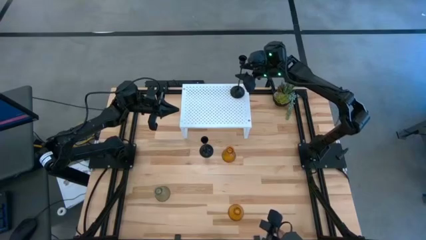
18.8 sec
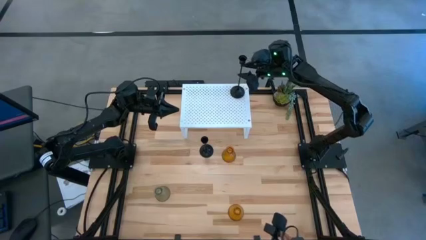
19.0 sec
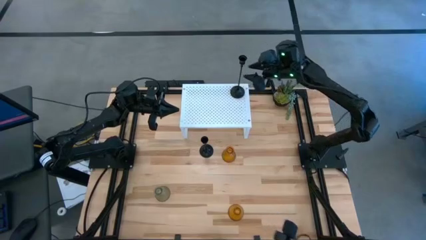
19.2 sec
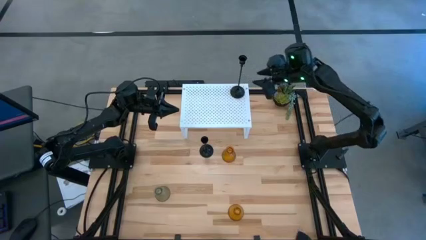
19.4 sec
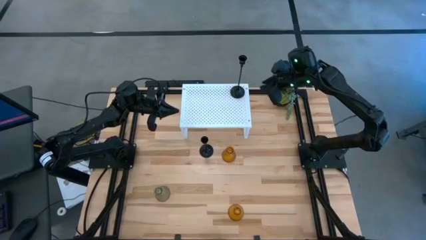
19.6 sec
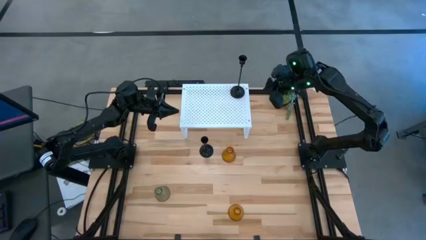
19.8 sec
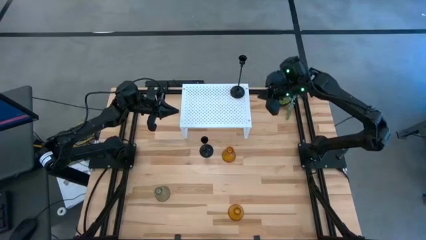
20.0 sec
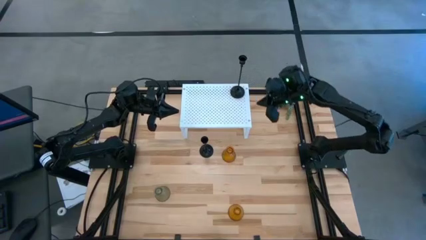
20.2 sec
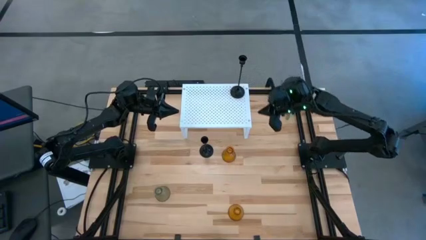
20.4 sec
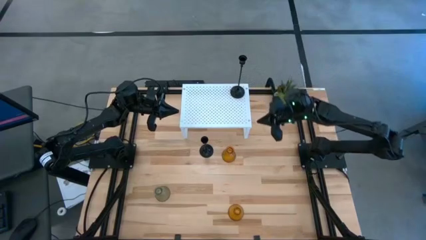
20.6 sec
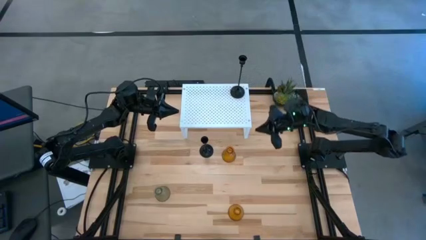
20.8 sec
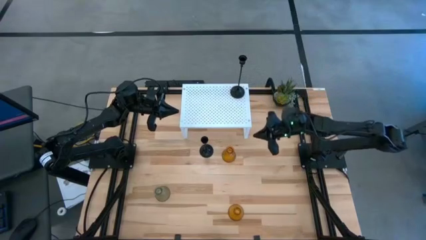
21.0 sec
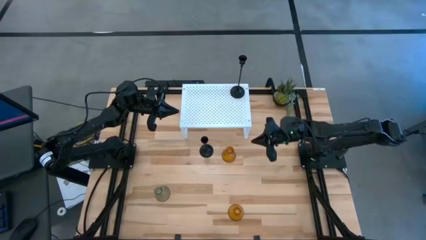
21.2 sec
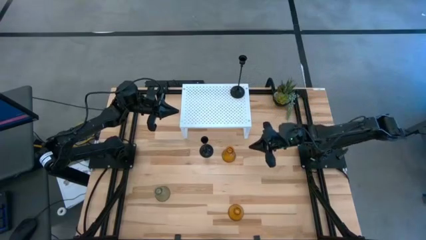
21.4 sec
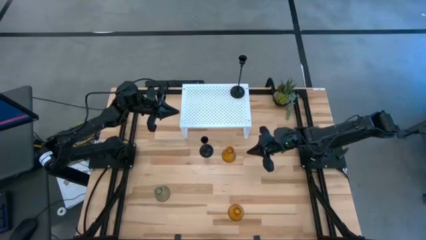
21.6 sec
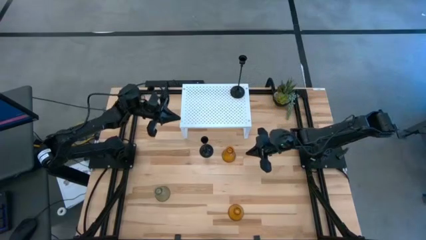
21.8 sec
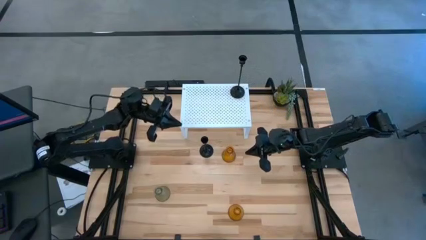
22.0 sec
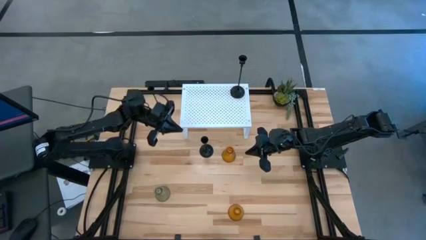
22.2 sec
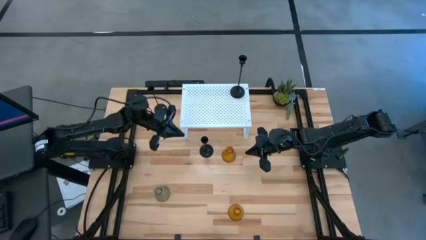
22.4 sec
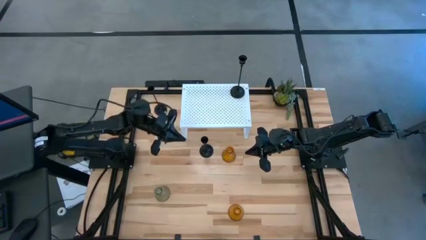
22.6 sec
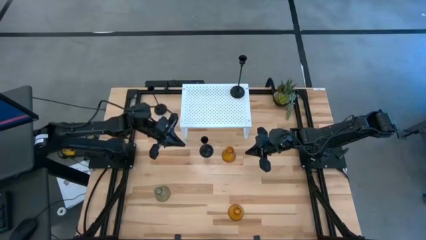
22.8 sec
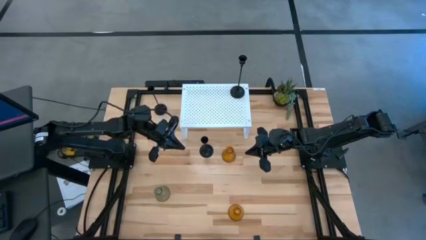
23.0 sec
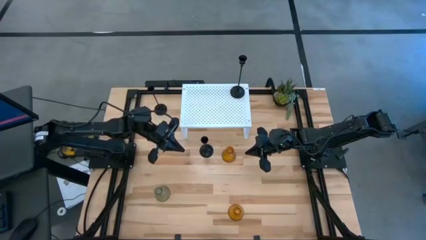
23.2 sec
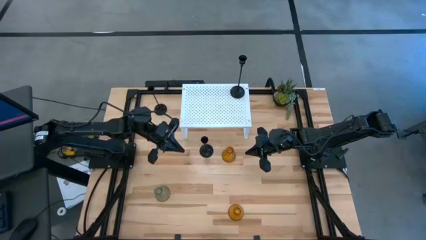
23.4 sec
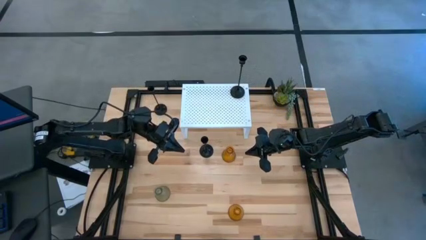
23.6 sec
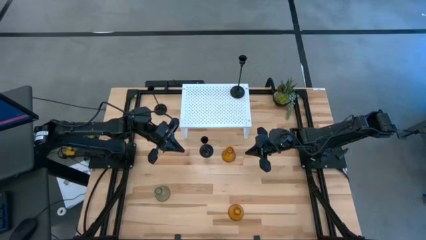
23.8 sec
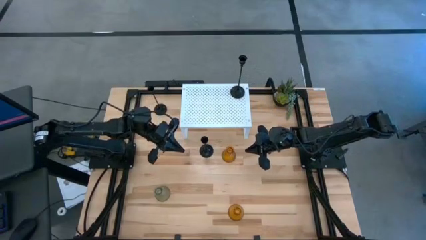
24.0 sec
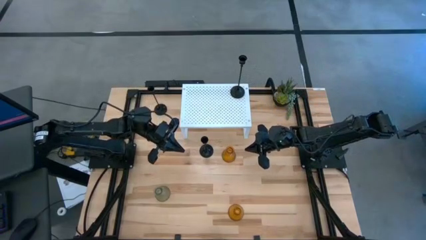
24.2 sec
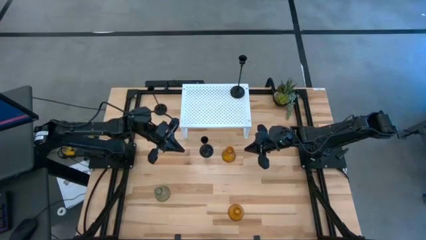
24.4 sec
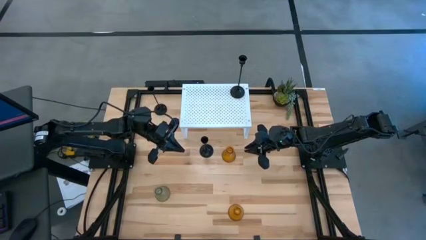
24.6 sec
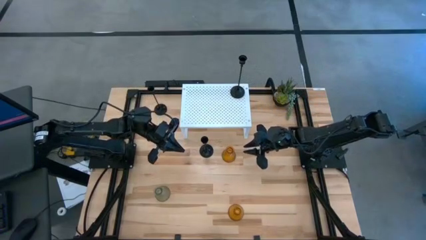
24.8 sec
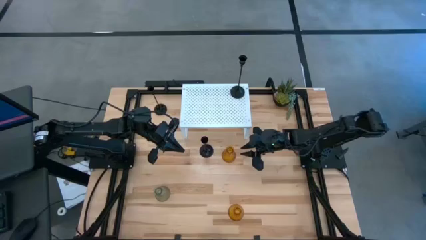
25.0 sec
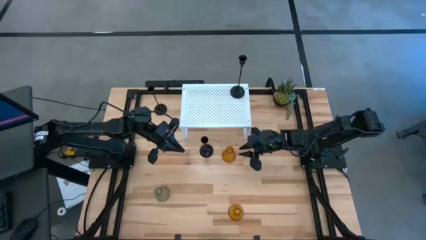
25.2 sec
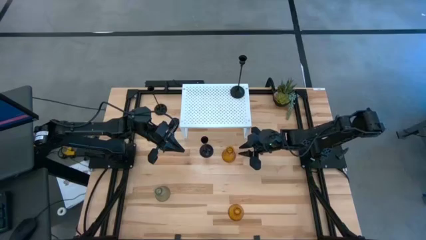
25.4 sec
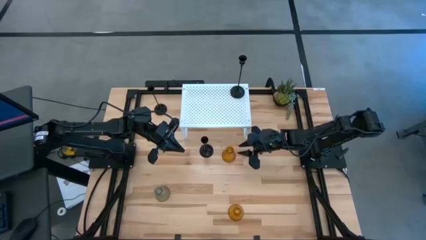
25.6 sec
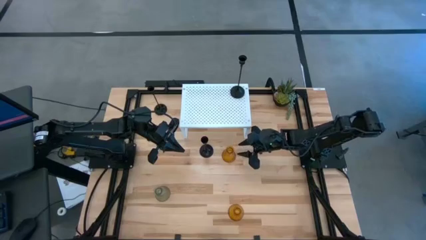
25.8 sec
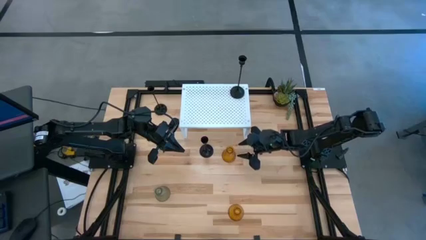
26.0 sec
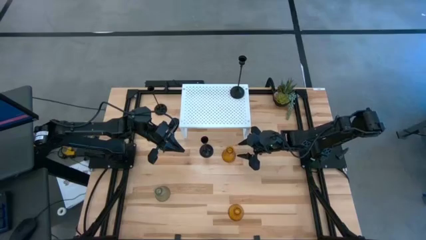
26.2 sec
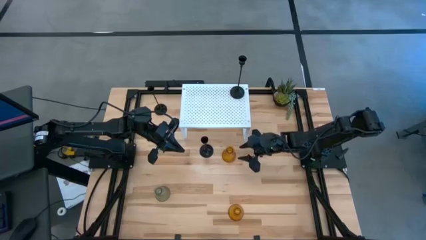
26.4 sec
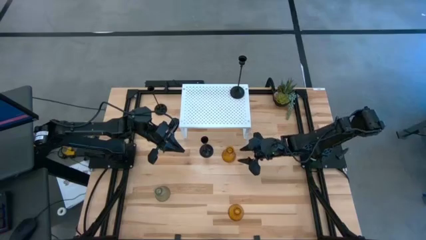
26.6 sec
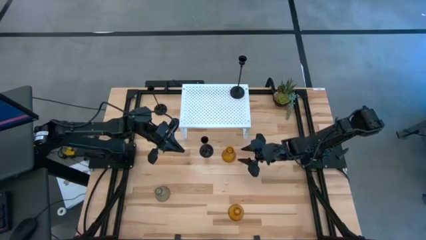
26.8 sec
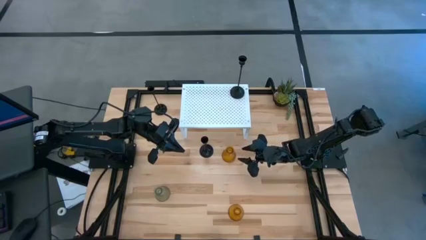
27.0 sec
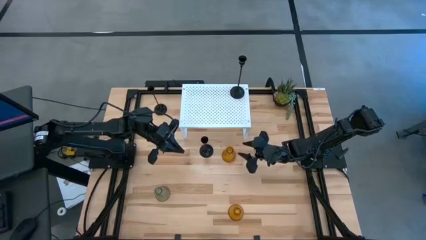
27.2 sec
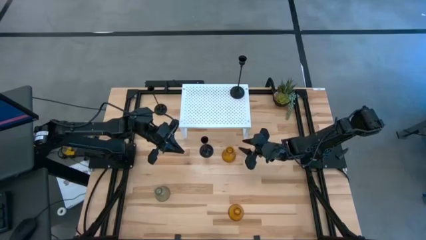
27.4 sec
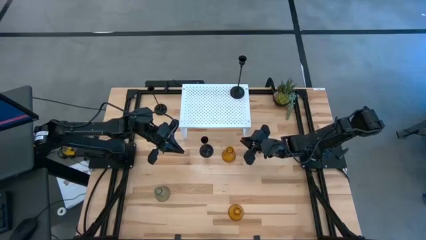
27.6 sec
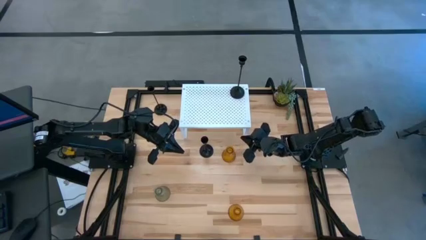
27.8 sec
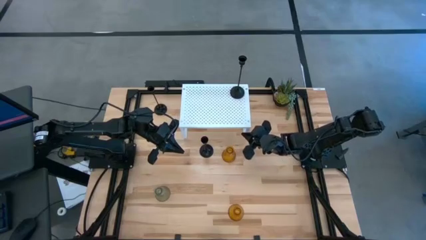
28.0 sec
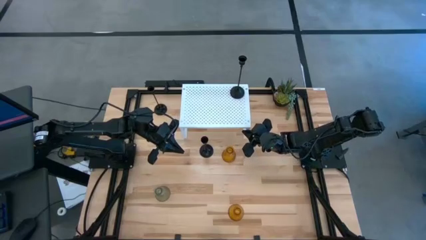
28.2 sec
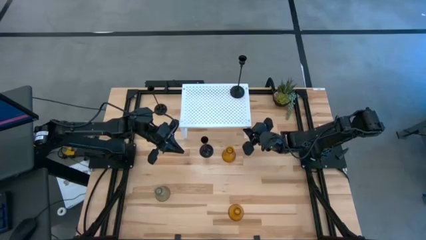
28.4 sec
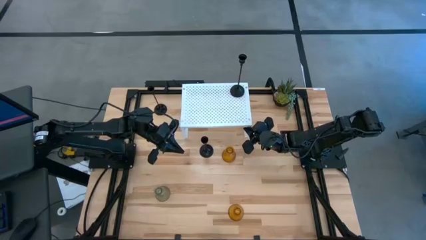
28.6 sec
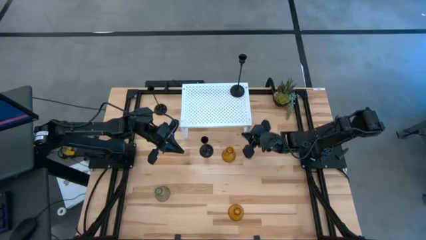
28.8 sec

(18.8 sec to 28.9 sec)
Task: Pick & Place candle stick holders
Put the top orange candle holder on the shelf

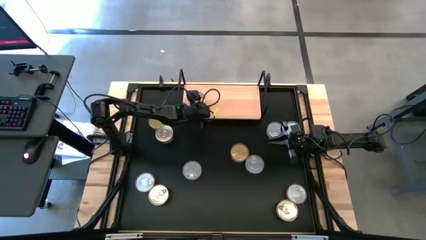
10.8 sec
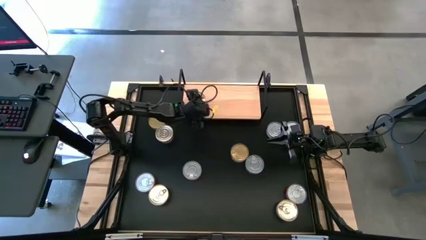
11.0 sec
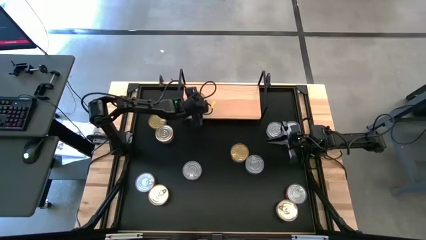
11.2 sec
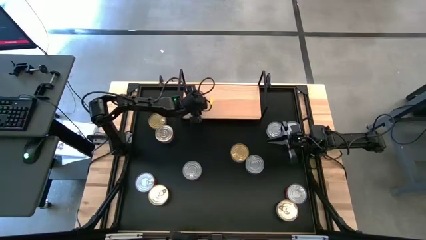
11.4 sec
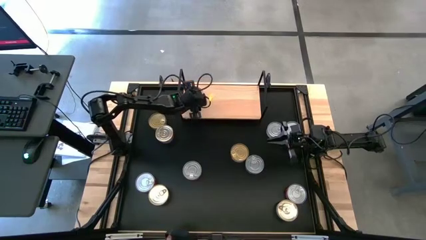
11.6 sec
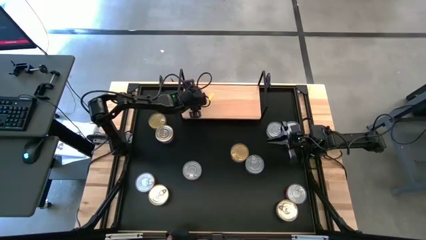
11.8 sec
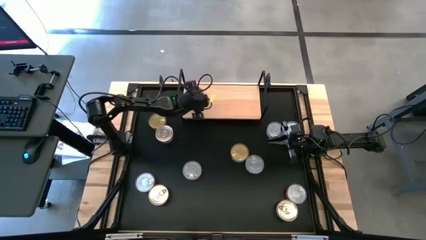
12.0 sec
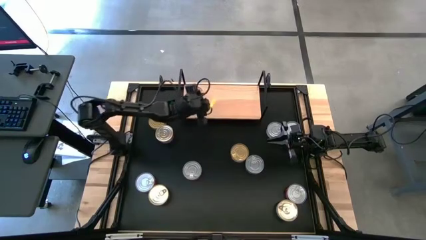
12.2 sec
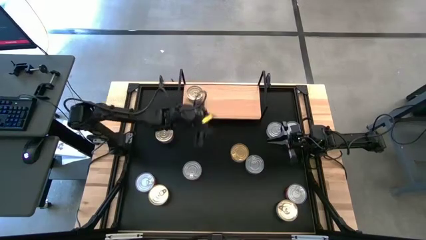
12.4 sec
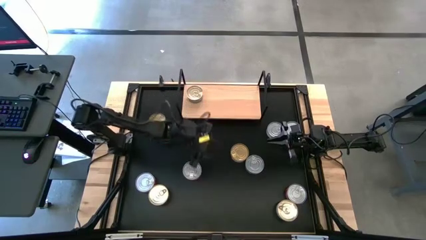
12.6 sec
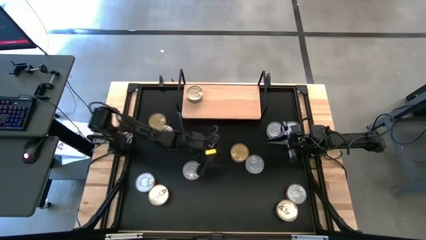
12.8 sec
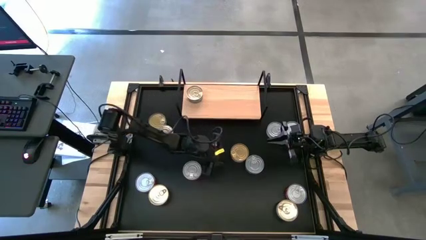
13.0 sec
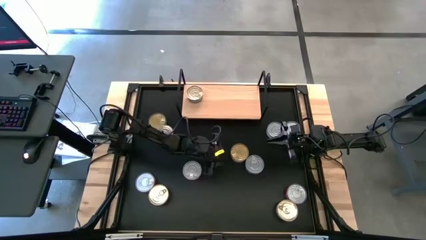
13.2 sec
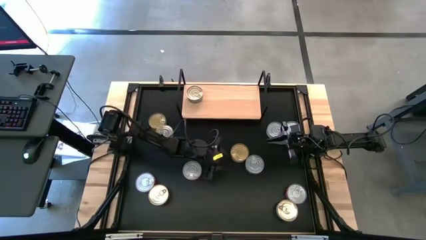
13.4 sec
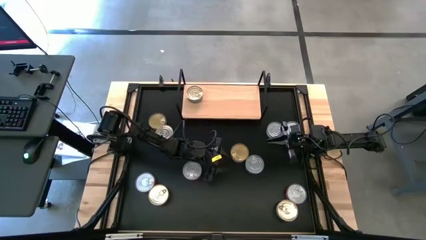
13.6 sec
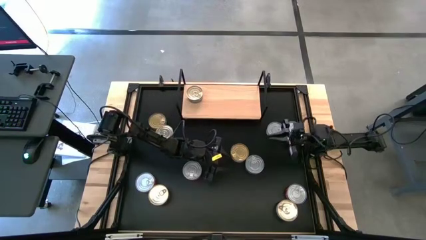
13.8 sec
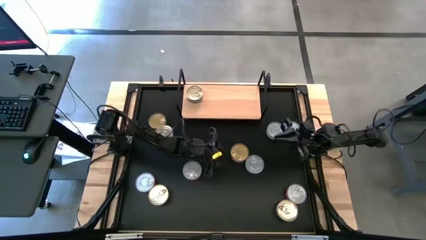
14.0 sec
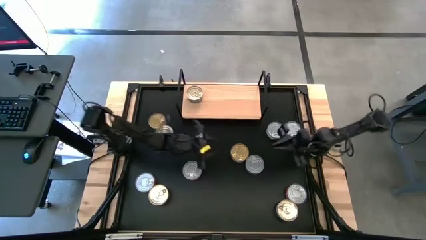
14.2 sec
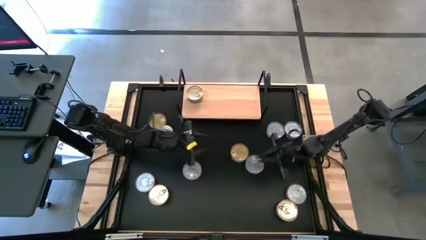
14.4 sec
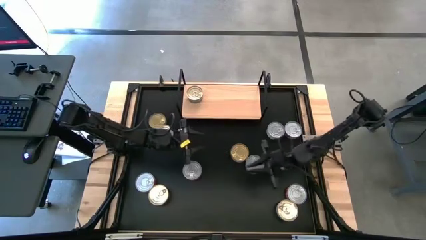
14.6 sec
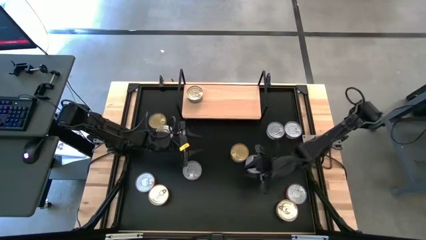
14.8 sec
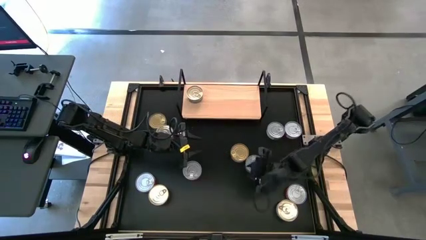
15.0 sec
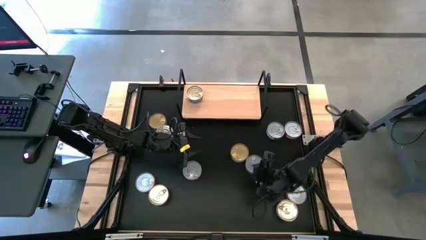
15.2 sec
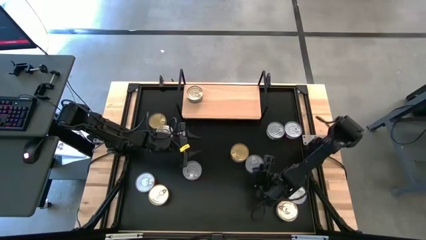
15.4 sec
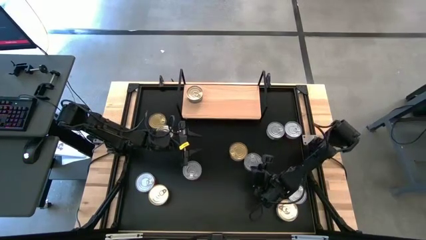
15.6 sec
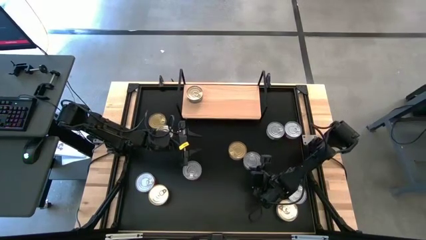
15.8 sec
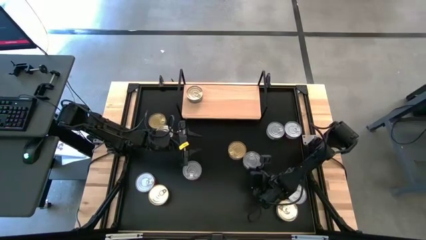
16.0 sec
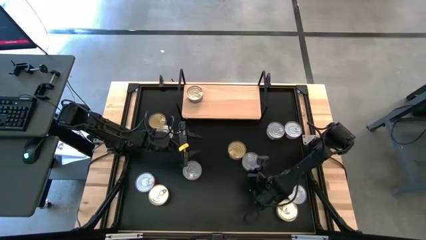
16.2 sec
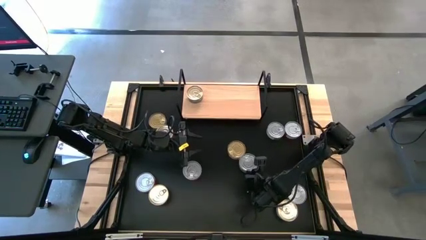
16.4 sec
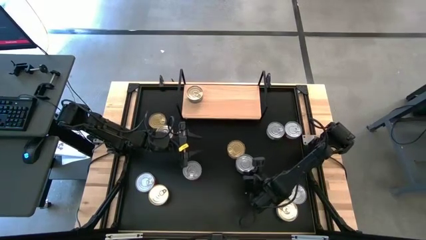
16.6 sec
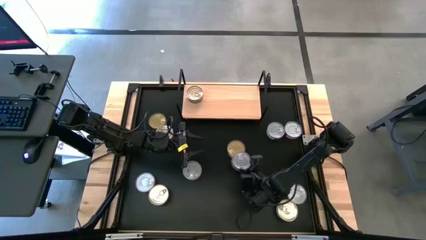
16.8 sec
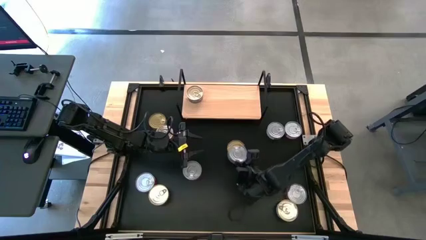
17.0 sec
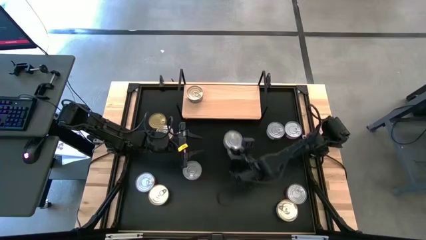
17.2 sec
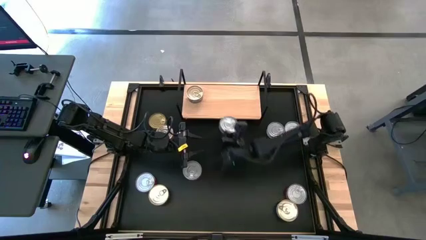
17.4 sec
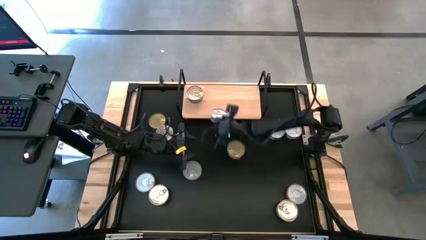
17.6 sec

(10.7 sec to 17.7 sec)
Task: Stack canned seafood by type on shelf
Put the center green canned tuna on the shelf
